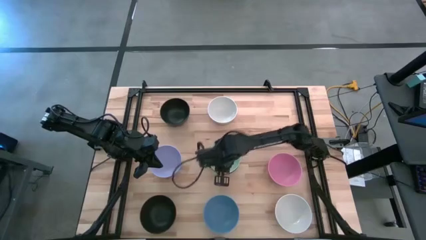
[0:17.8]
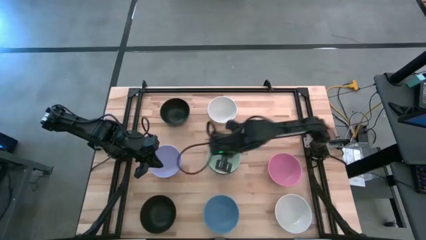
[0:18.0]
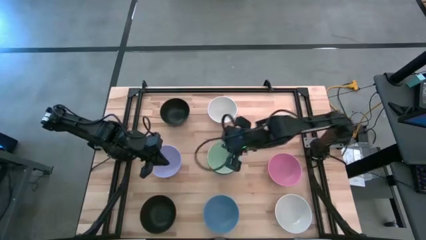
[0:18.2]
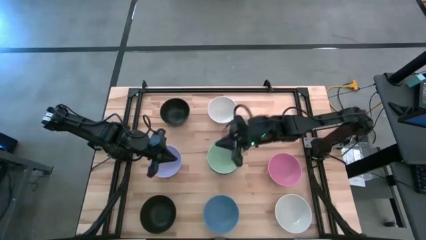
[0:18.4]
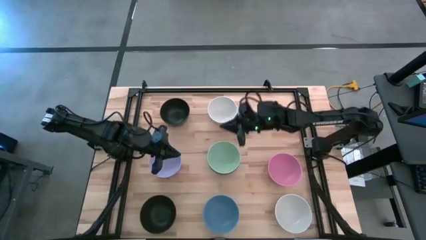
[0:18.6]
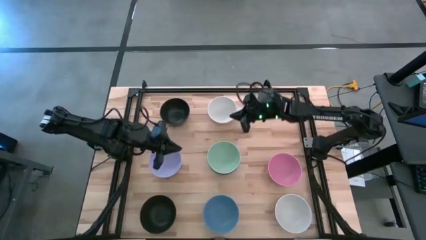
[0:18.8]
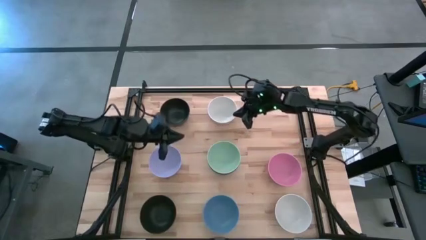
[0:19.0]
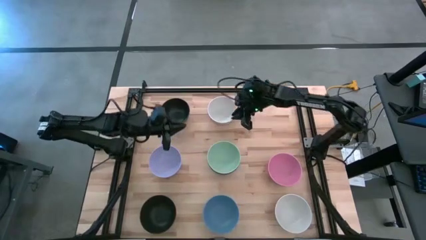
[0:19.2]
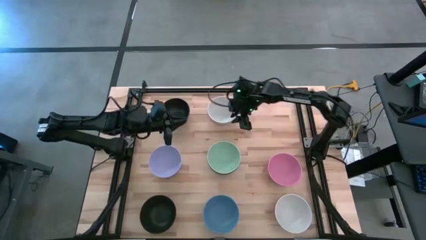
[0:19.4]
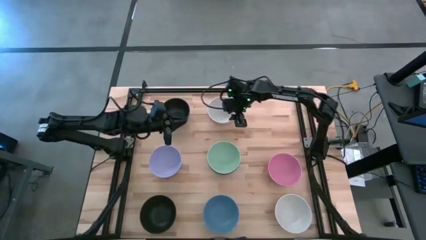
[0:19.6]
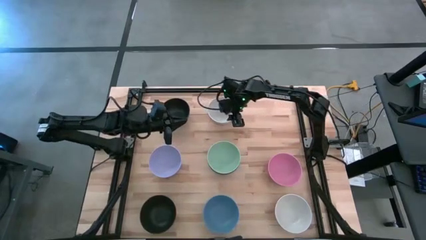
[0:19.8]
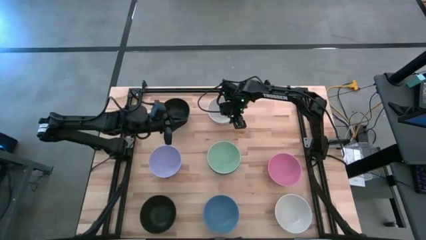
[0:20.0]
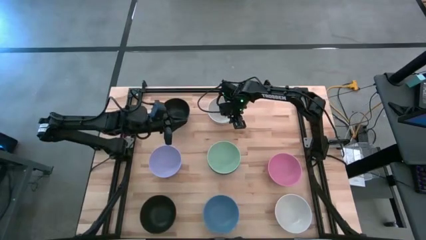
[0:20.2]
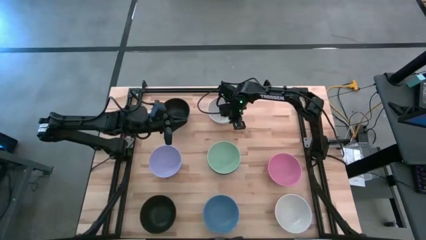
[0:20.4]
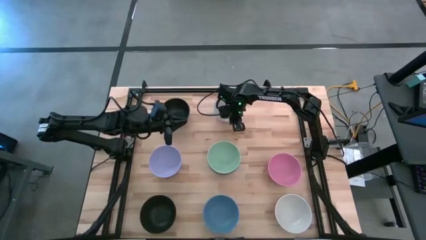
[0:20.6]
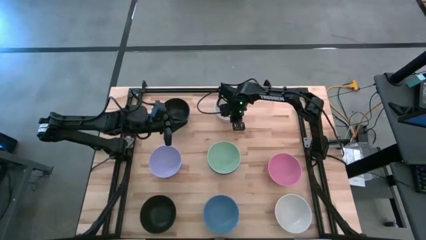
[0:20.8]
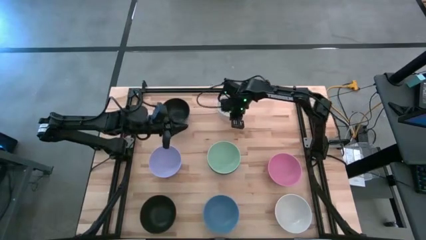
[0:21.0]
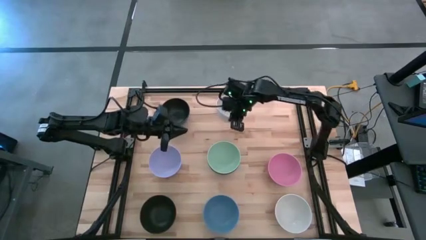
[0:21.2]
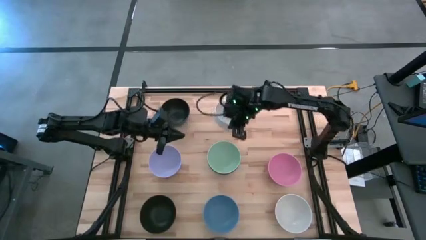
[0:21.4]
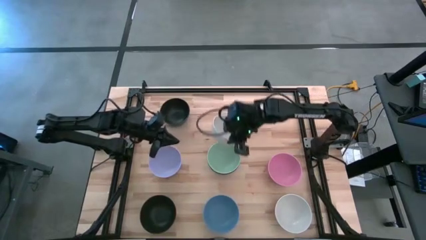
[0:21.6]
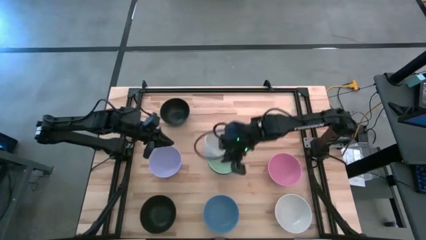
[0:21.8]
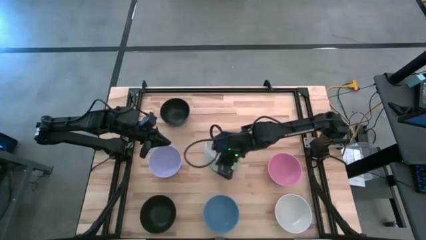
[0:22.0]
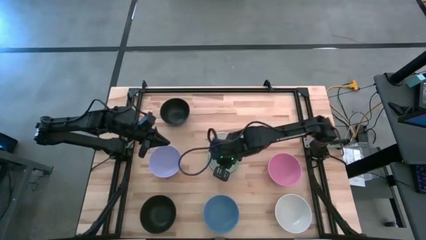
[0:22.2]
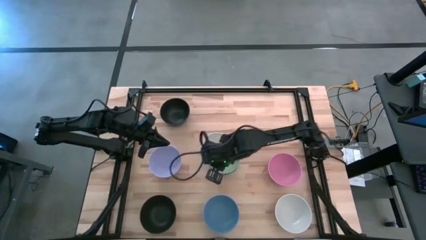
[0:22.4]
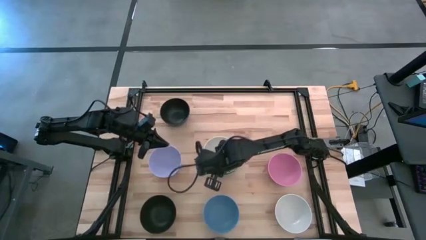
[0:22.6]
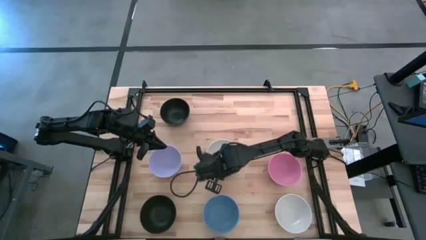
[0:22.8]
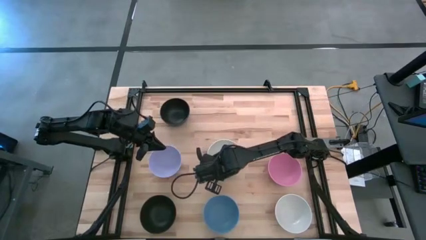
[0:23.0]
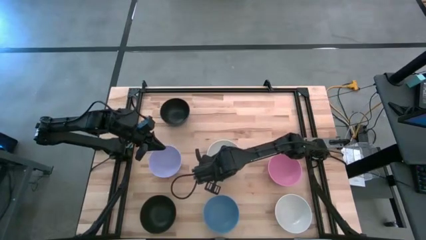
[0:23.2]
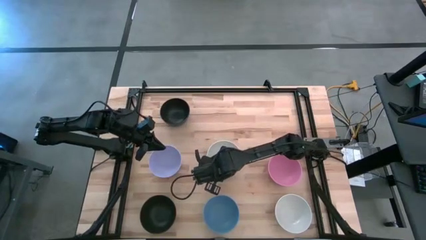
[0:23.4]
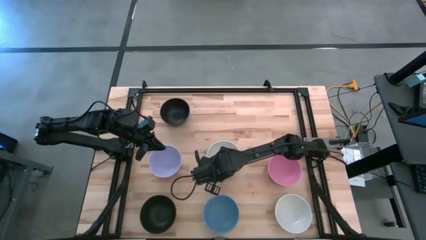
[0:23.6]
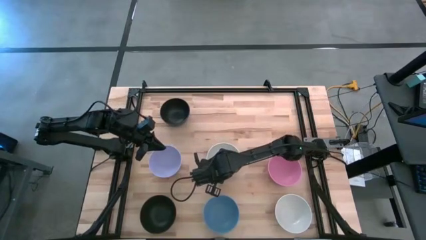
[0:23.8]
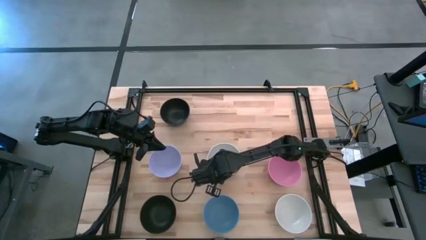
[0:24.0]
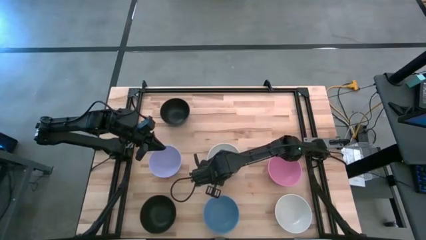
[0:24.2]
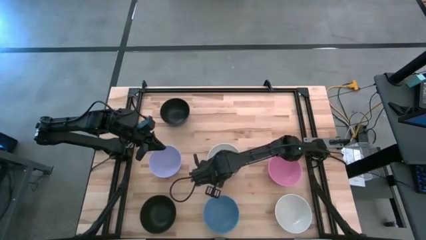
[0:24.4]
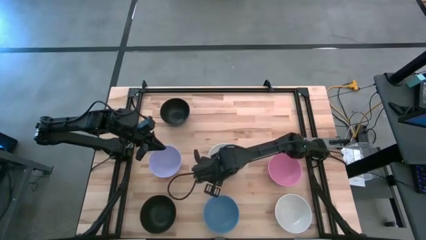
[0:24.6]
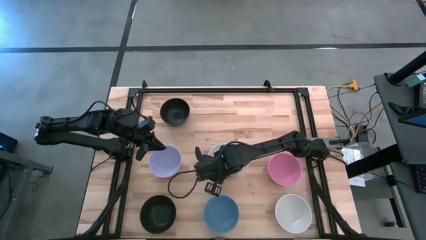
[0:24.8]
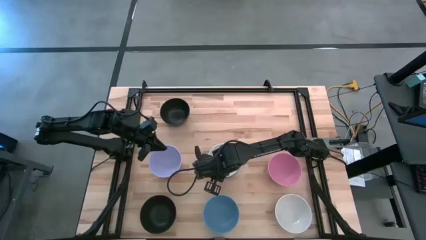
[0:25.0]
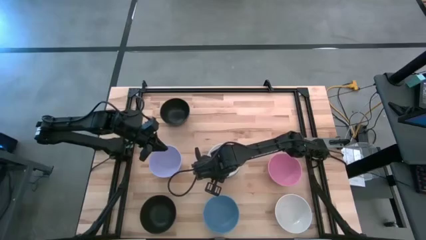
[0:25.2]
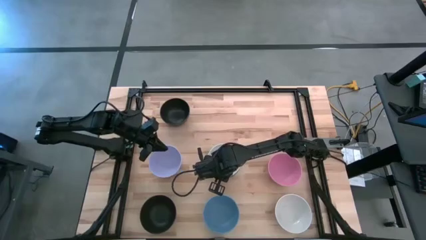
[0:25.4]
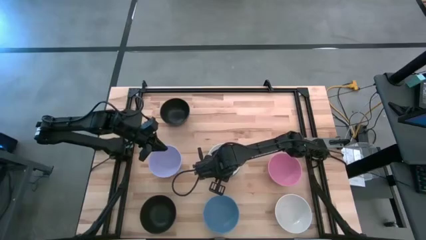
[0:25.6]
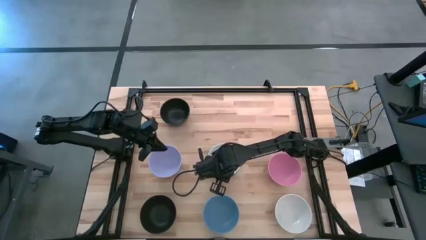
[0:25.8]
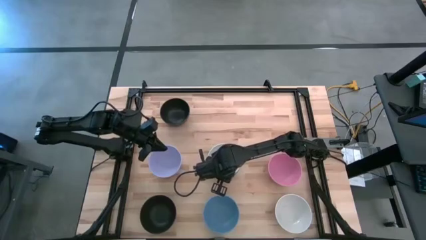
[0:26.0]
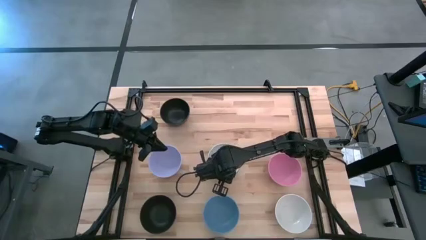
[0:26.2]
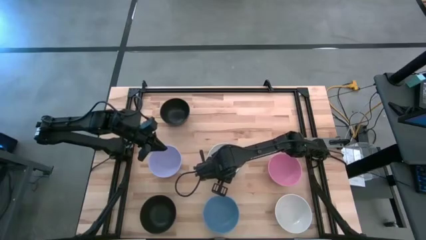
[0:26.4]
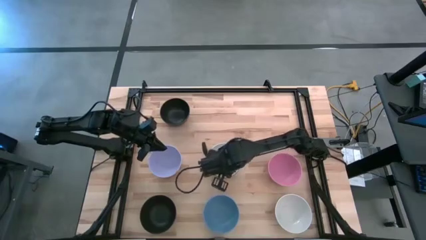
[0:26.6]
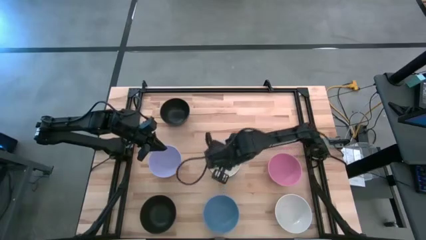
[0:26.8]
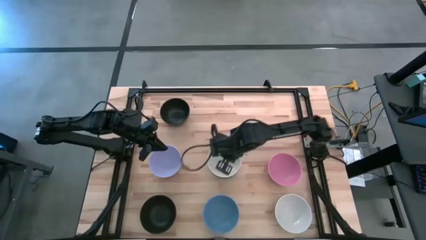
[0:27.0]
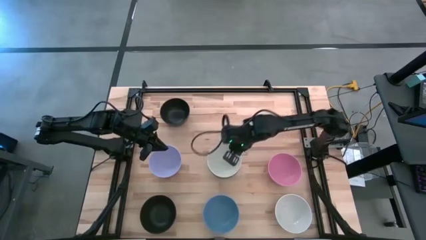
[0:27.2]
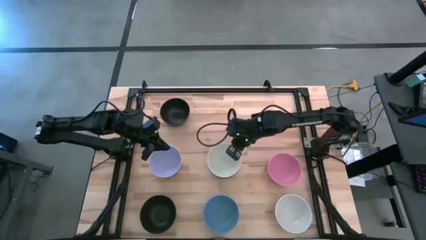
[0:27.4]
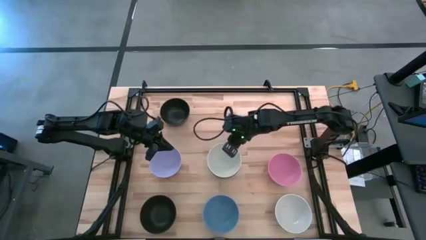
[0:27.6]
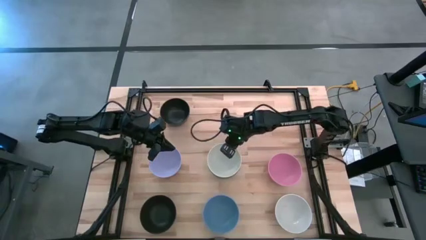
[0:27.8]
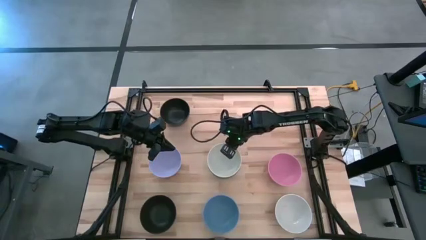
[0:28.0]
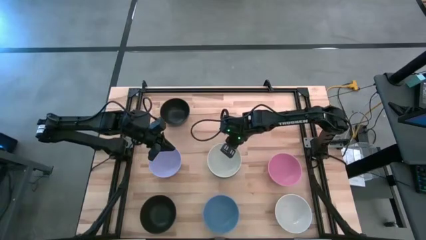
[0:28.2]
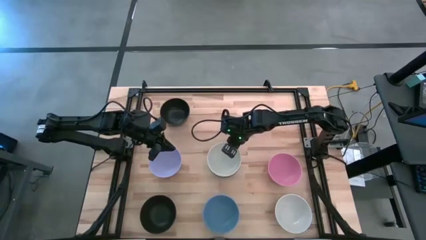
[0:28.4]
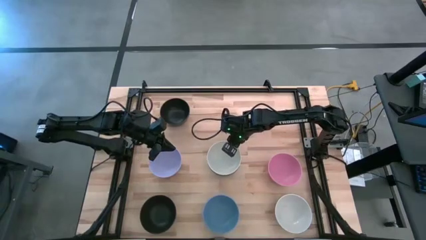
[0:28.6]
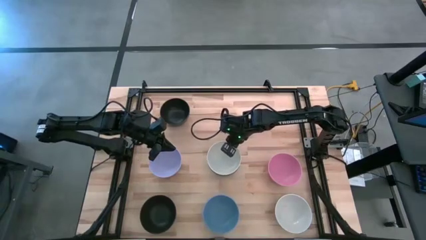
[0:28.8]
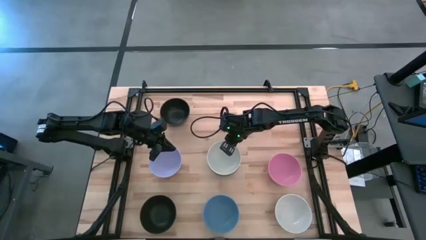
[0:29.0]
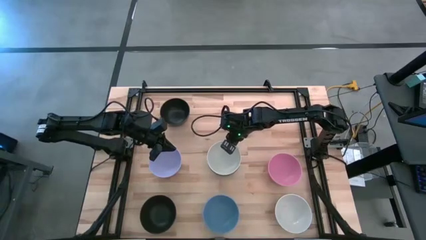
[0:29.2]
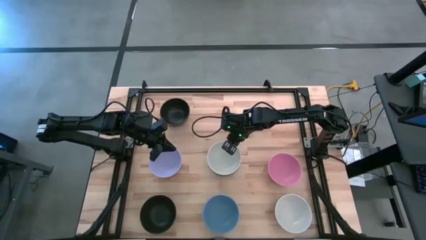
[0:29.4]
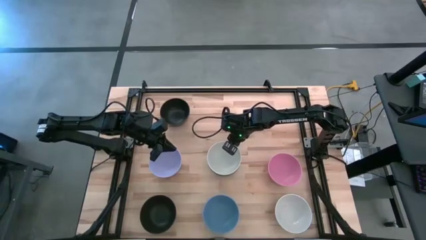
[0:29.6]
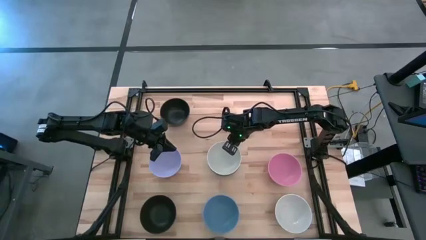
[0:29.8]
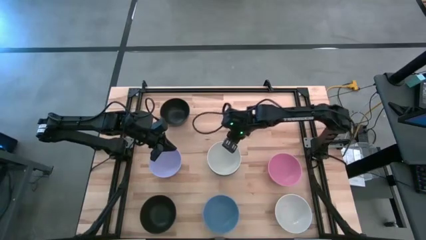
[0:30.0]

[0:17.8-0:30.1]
Task: Nest bowls inside each other
Stack the top white bowl into the green bowl
